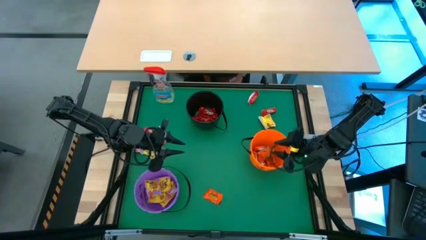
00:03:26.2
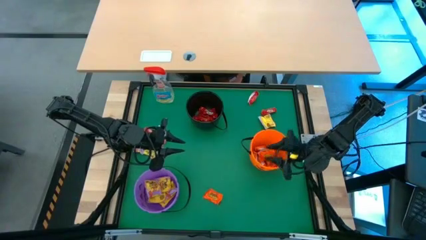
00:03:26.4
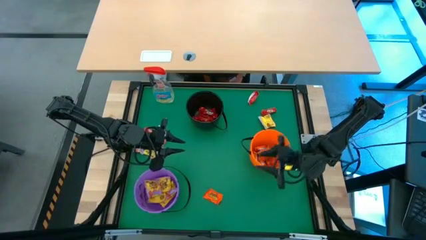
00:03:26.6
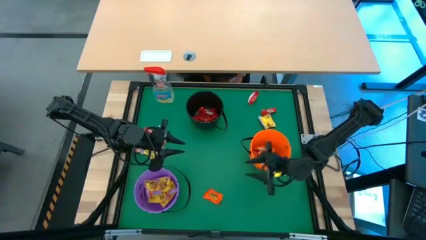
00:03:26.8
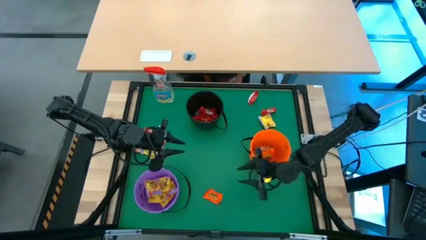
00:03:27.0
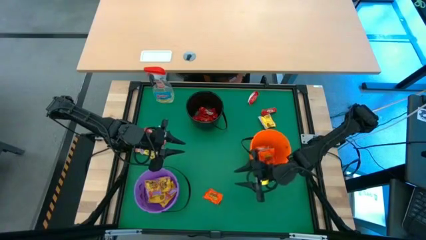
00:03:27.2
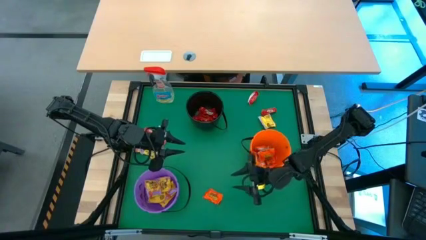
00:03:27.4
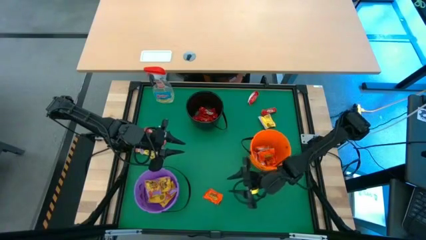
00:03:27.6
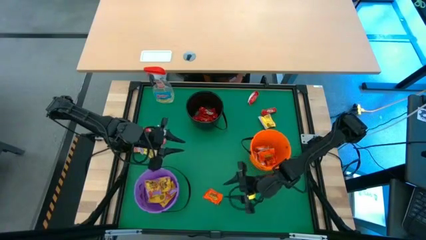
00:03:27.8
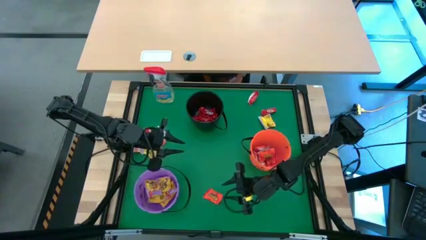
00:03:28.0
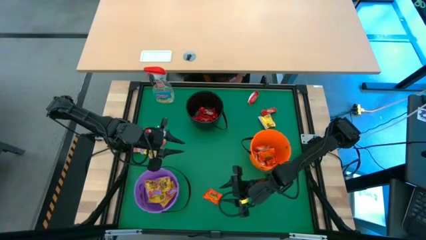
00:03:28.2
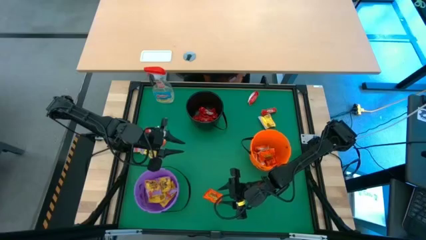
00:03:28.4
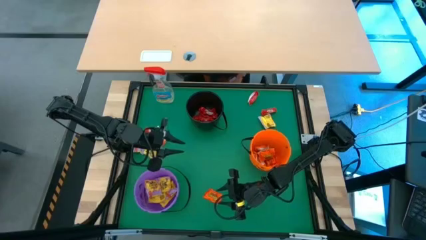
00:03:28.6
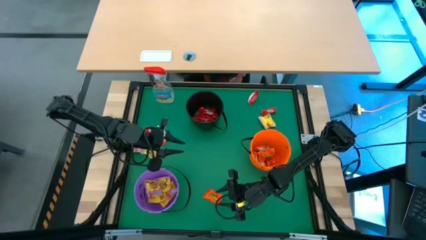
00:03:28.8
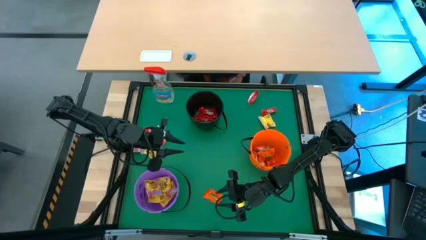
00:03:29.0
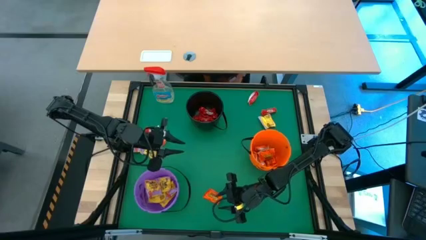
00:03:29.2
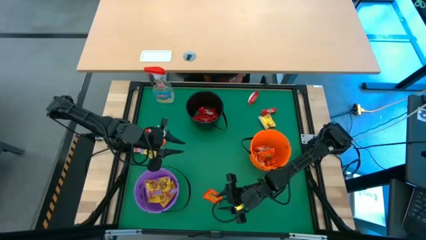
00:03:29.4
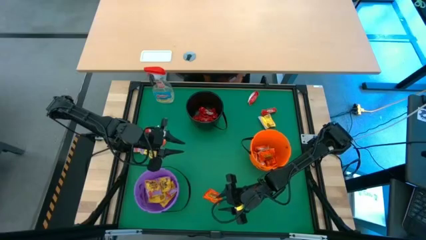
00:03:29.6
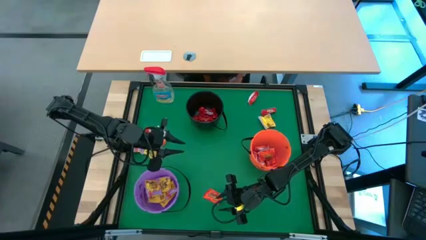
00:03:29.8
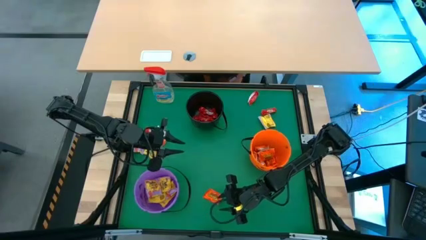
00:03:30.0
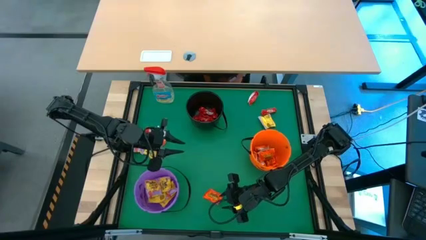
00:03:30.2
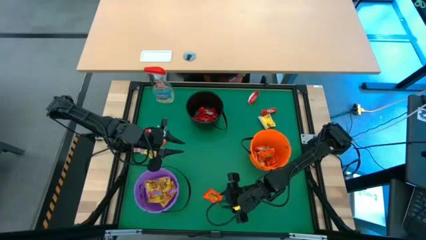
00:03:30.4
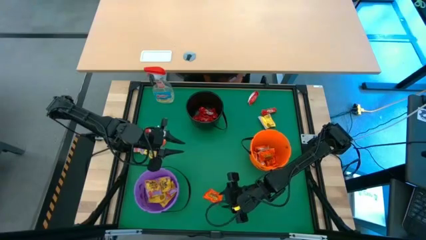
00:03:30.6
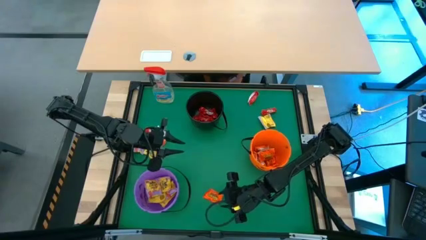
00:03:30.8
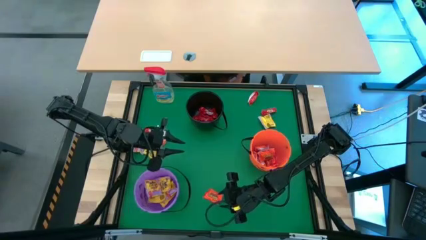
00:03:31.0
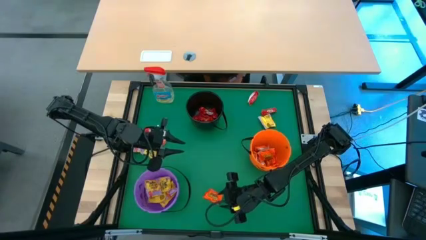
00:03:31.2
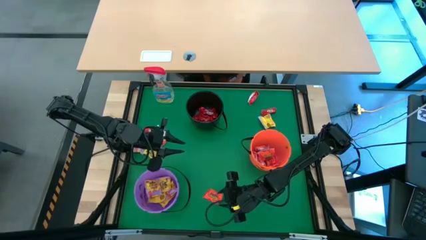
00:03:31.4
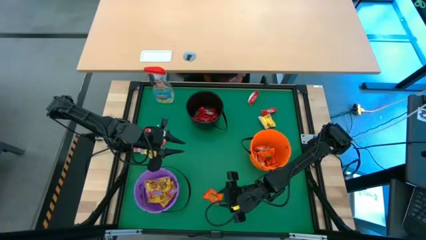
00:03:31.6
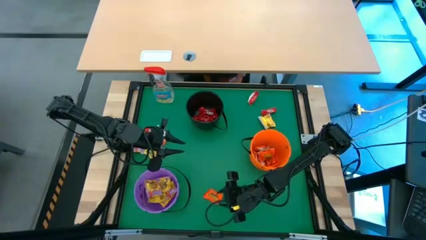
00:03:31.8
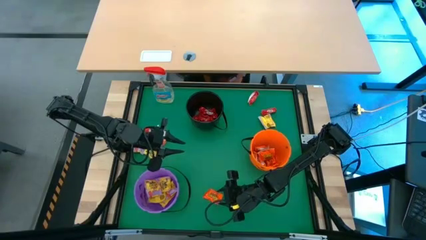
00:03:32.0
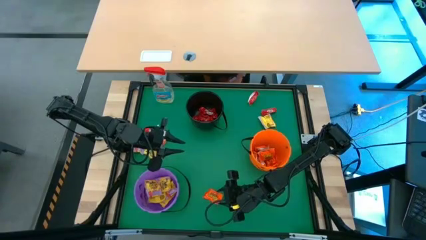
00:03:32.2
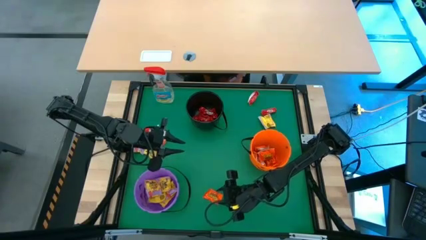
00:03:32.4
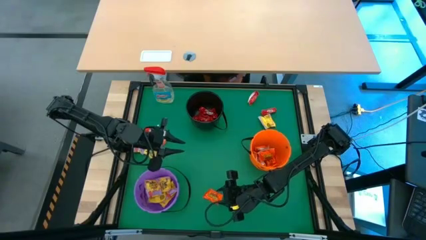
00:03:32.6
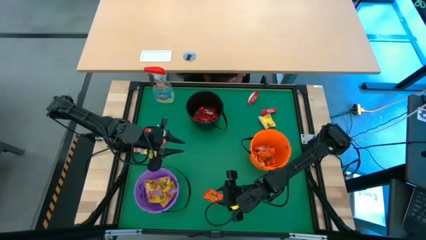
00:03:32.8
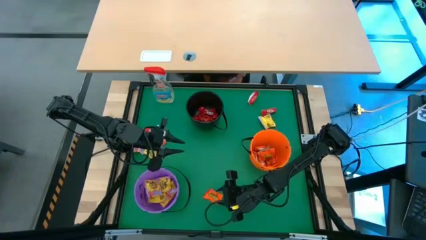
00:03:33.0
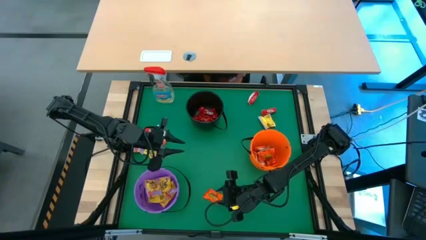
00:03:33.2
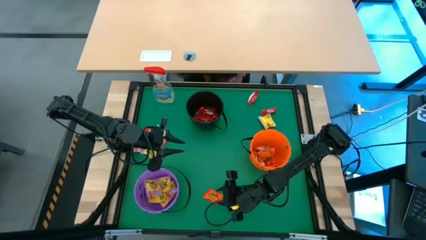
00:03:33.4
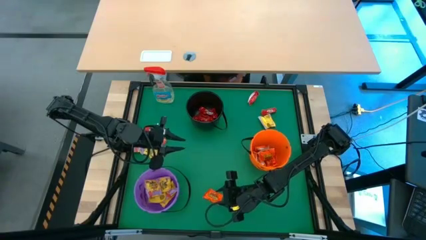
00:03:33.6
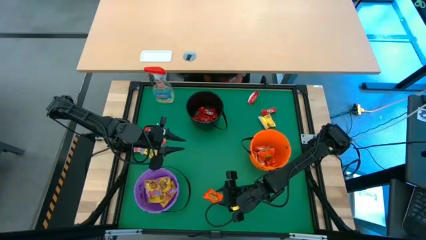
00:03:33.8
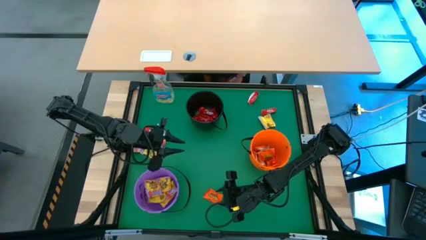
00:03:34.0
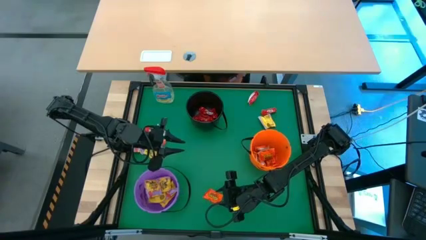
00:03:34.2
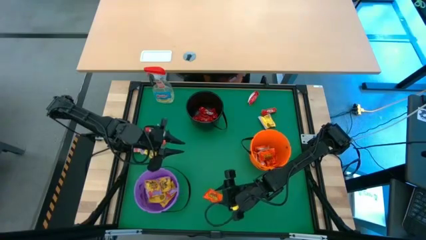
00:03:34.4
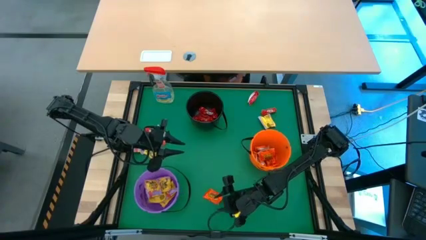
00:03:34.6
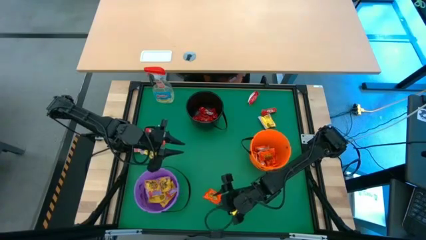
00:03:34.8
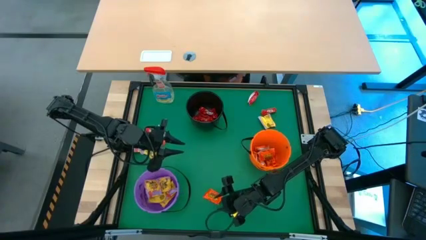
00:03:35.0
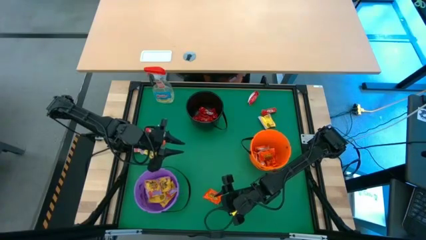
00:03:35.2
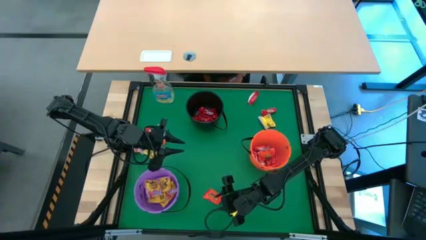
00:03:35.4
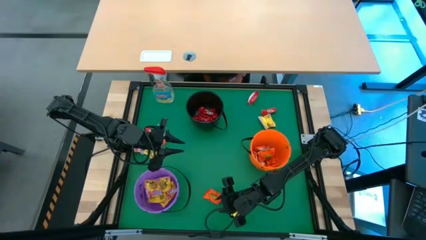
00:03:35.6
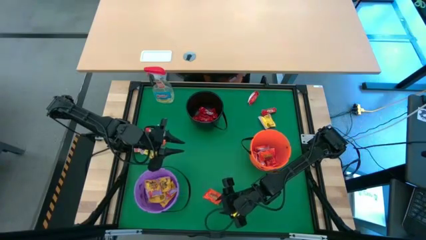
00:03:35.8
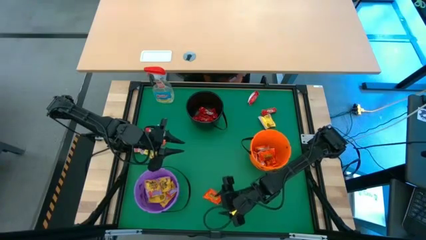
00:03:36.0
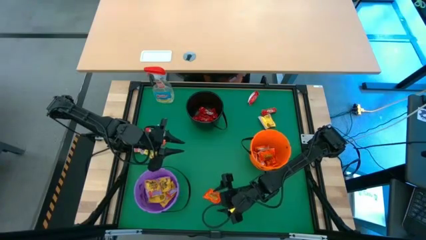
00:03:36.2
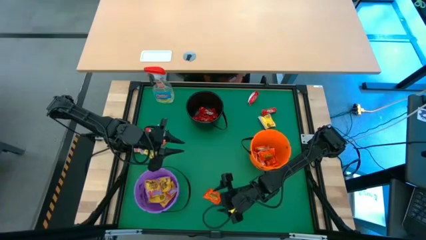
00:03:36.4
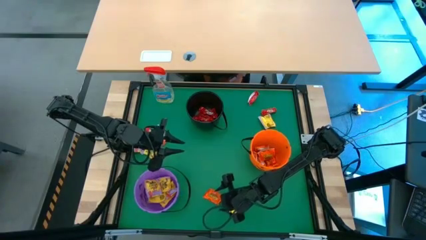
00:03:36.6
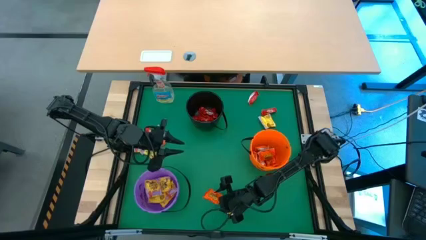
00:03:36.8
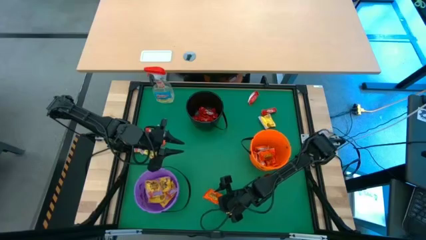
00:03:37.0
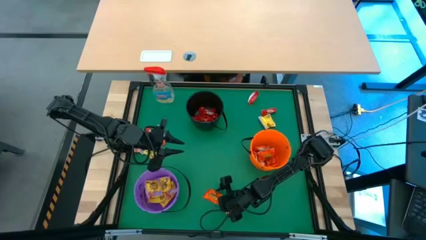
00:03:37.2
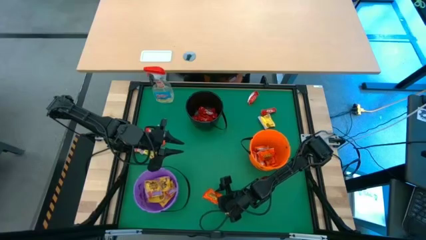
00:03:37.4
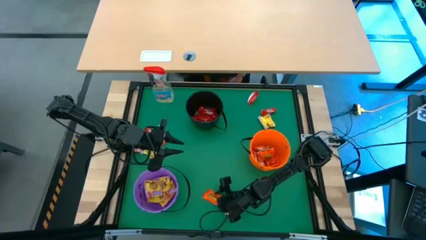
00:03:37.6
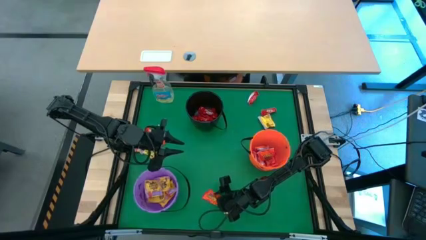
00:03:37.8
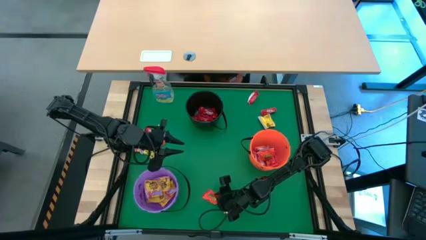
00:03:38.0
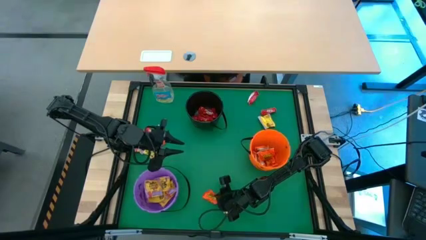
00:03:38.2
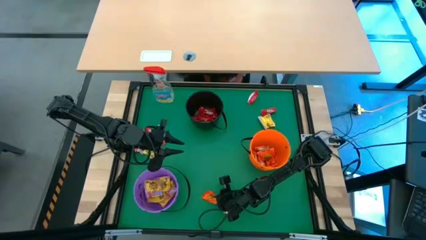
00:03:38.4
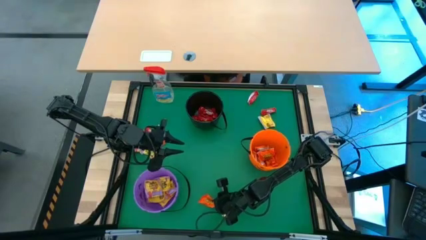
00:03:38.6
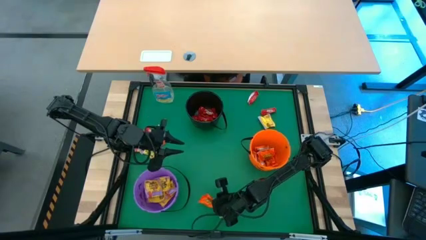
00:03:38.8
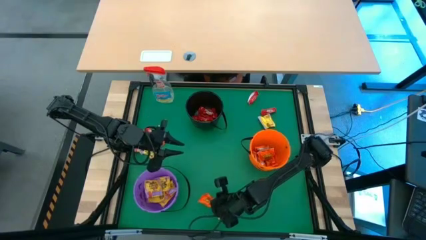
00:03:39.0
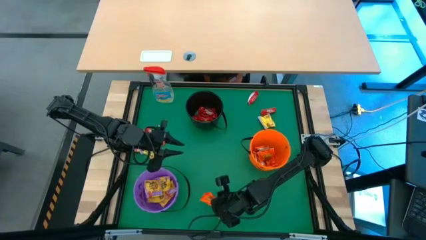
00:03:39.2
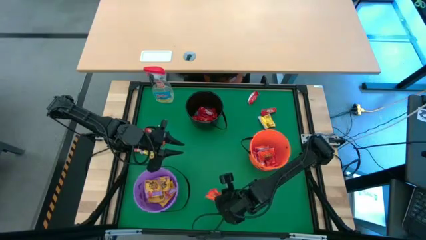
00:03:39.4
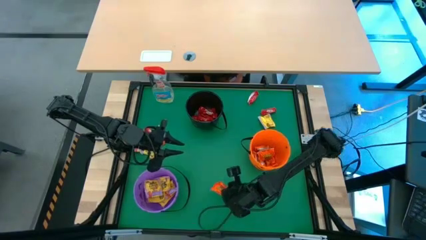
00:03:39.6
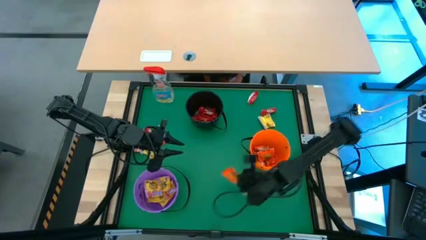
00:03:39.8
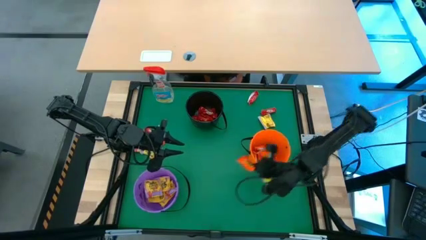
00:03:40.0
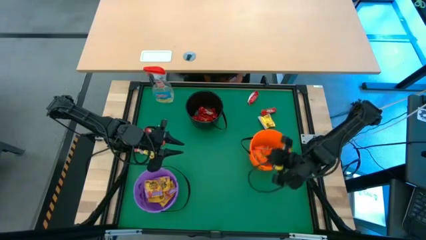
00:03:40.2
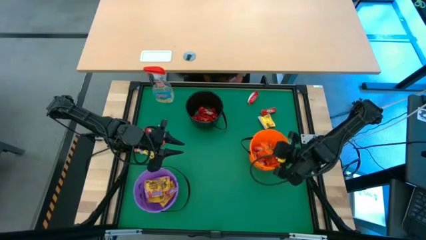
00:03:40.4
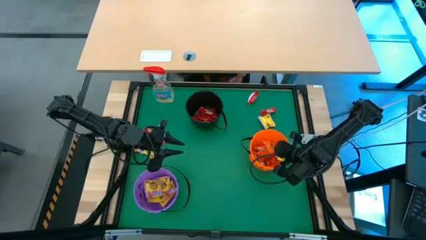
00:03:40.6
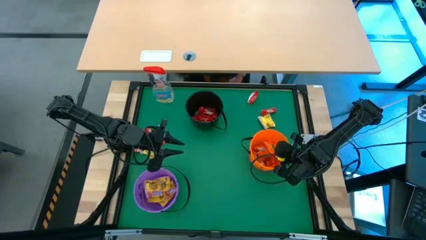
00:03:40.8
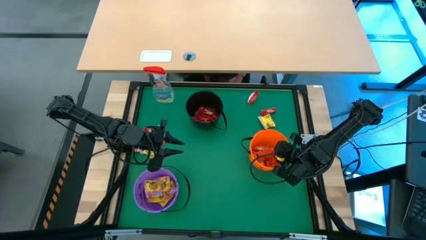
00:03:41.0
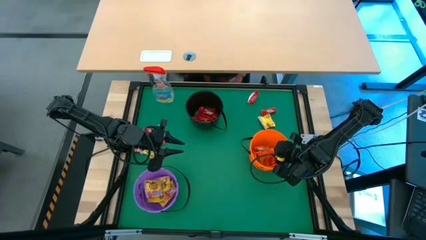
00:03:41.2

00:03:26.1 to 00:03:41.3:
Task: Sort candy
Put the orange candy into the orange bucket

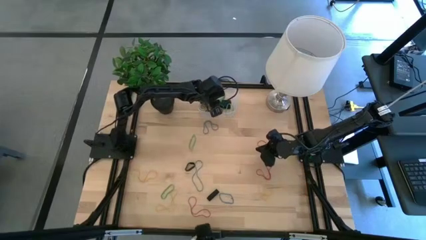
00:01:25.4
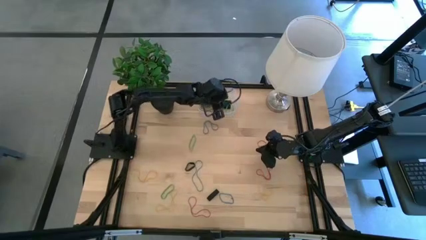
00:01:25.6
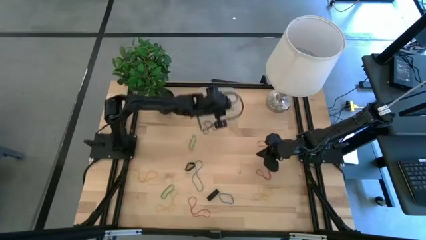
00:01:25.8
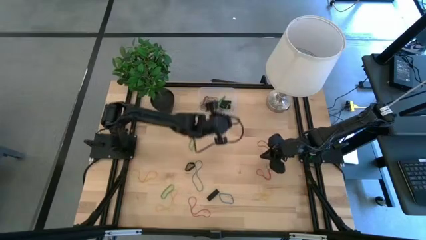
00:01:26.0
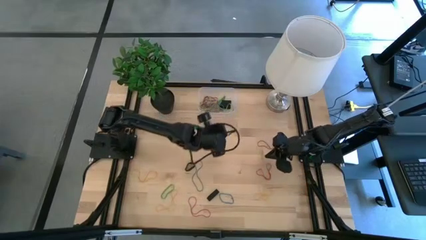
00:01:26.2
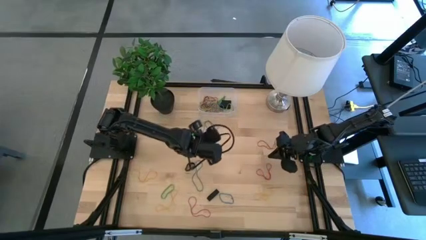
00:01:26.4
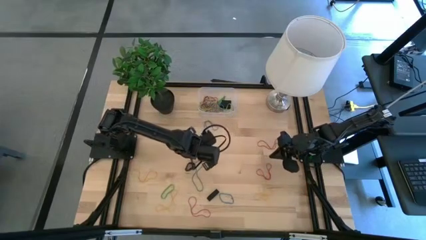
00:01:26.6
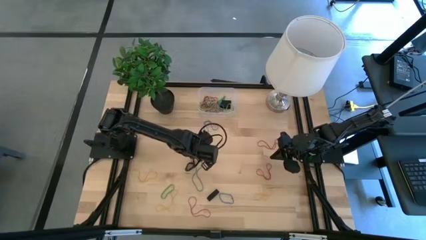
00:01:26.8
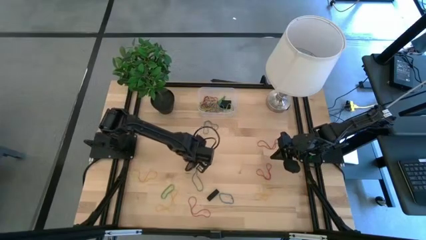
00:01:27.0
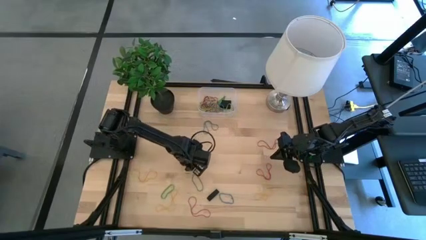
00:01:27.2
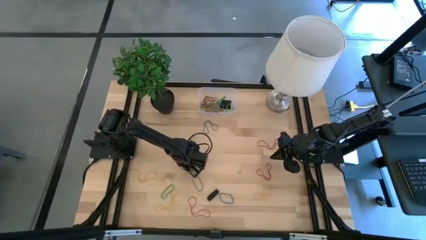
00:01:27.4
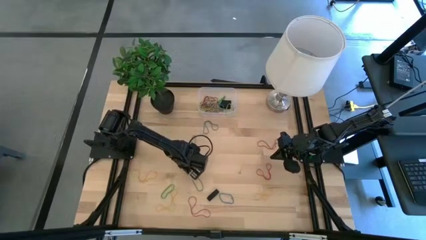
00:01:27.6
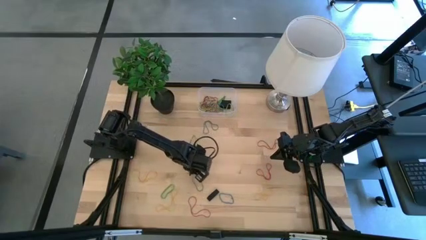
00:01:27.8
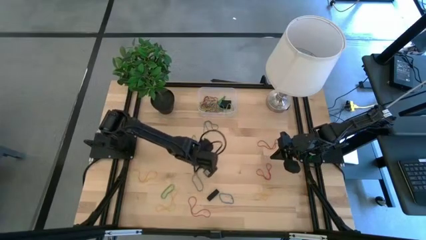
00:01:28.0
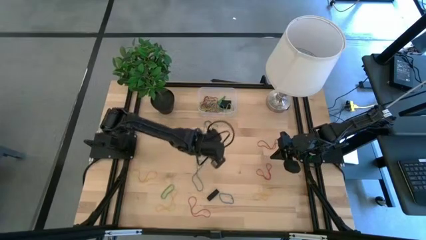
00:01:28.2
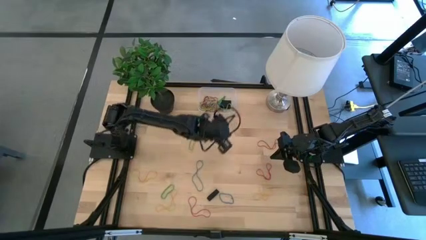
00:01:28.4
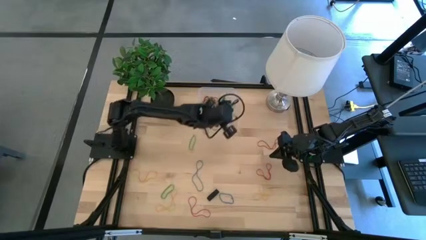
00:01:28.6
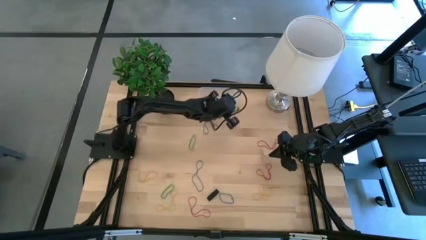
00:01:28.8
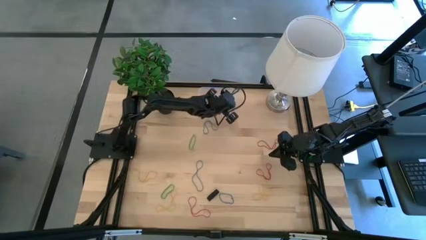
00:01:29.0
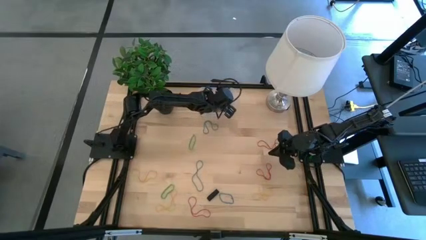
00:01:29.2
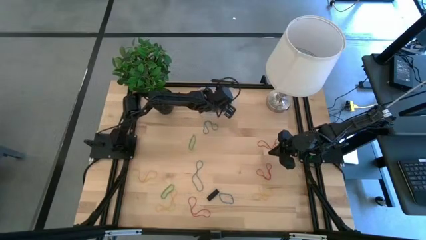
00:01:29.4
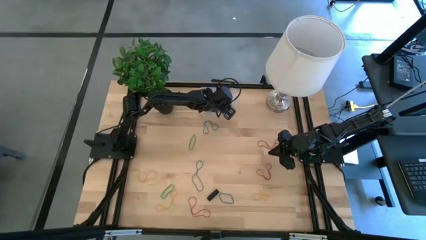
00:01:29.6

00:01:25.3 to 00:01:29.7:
Task: Pick and place rubber bands into bin
Put the black rubber band into the transparent bin
